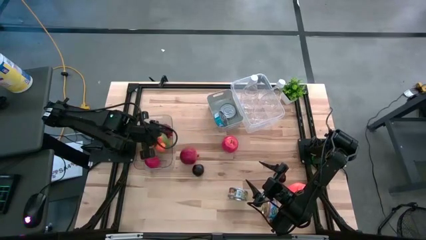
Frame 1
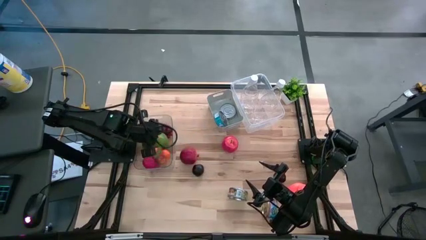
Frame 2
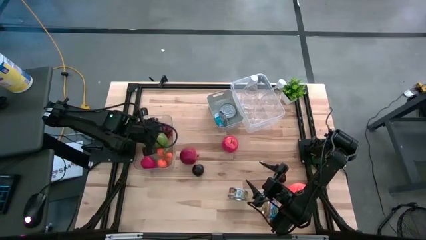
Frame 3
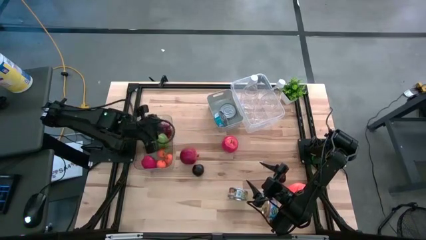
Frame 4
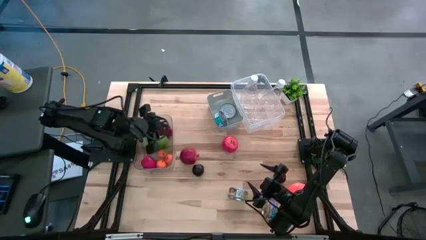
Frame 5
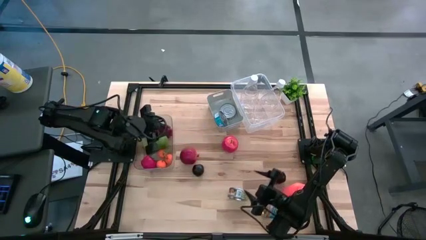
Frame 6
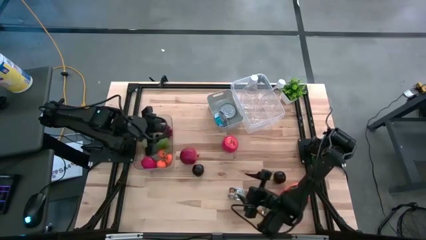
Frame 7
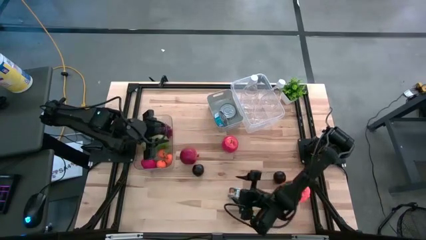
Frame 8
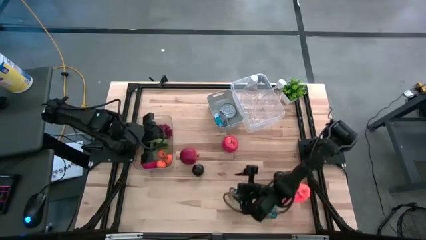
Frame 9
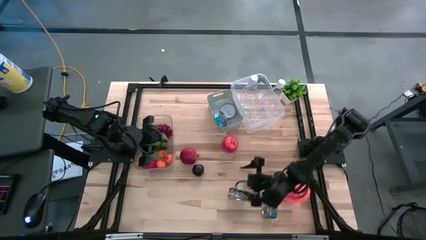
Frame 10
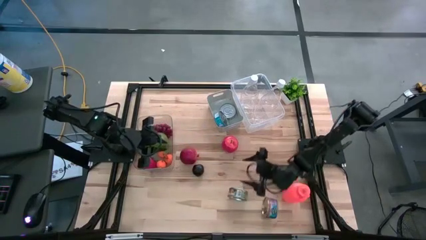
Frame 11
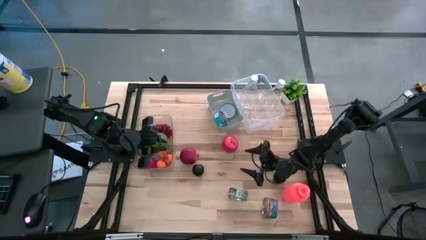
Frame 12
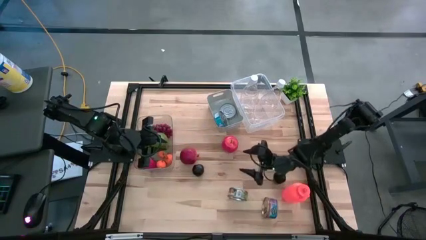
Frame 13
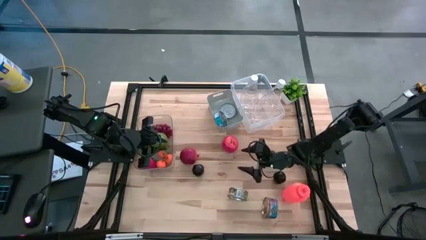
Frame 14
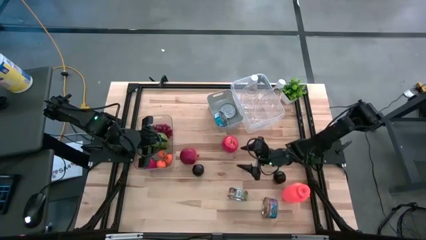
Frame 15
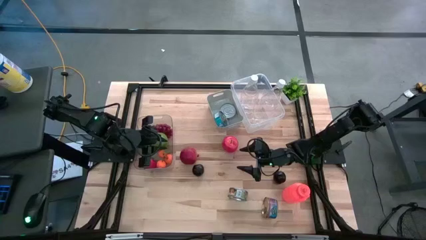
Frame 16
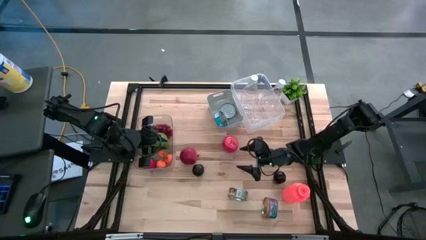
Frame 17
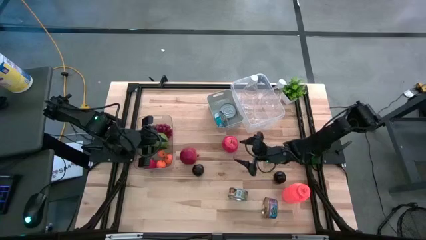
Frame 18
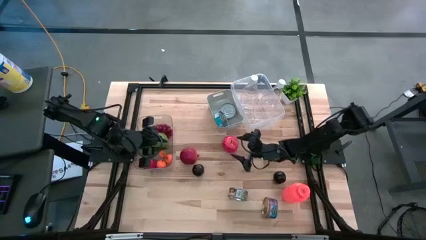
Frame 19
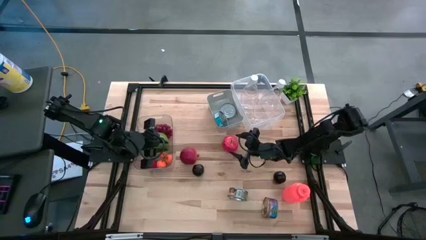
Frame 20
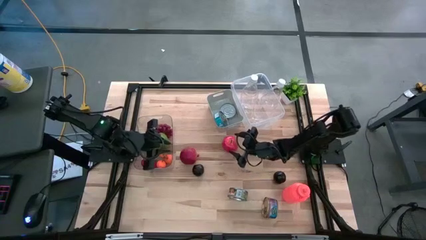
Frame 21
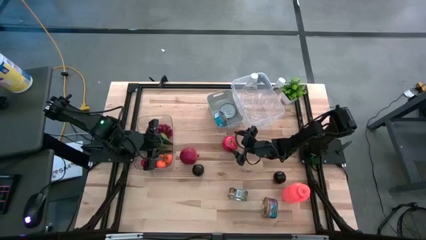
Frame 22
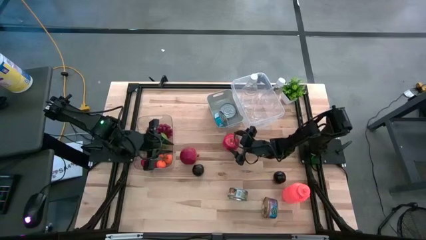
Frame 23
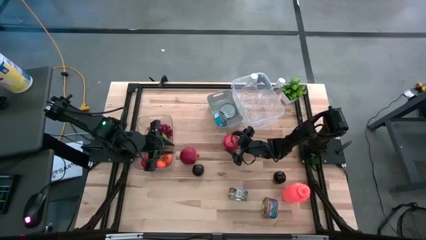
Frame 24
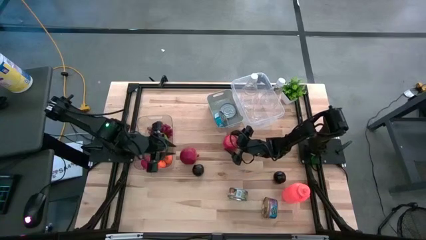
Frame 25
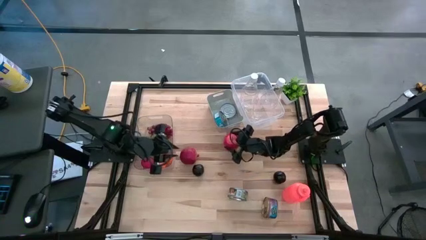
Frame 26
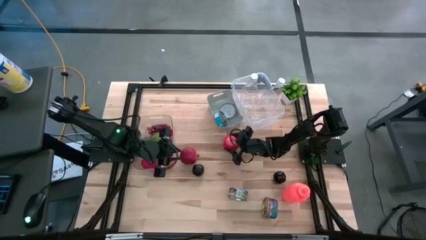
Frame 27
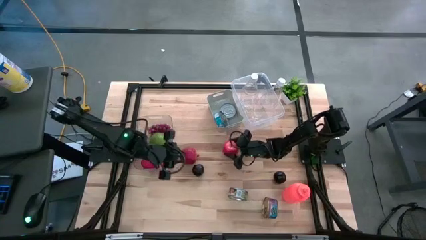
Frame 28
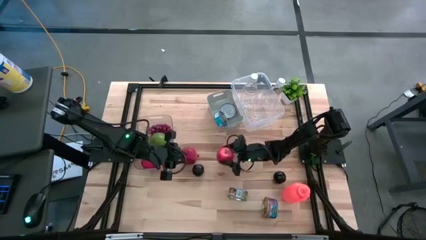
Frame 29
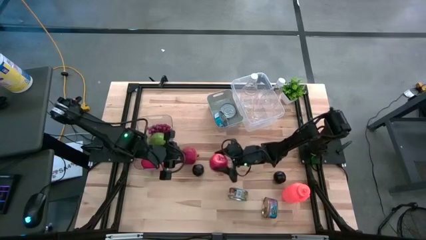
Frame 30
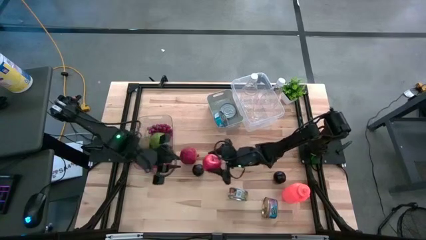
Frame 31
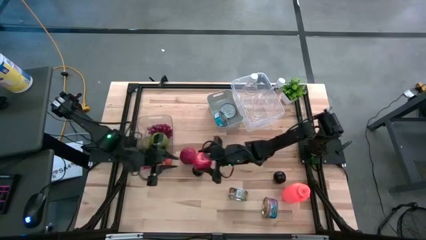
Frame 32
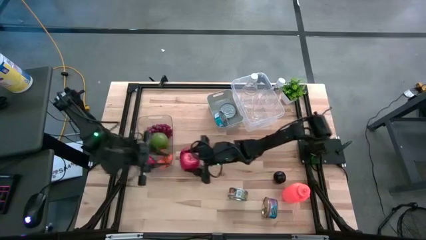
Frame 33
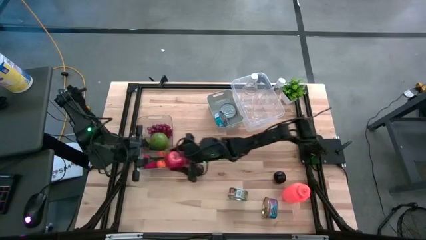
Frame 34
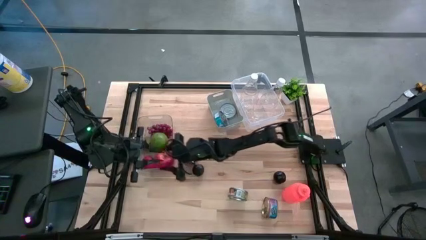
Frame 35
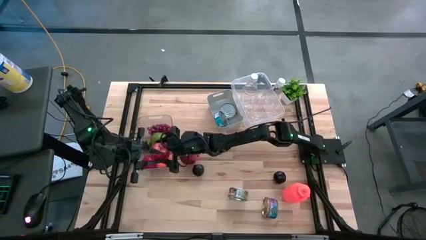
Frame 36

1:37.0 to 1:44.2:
Task: Pick & Place Food Item
Put the red apple into the left transparent bin

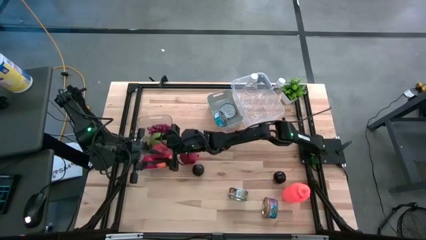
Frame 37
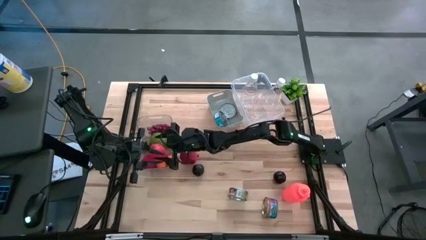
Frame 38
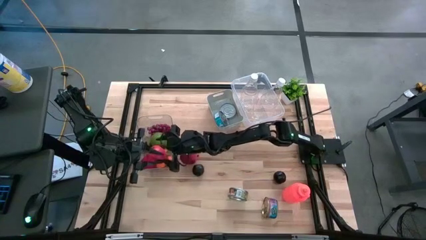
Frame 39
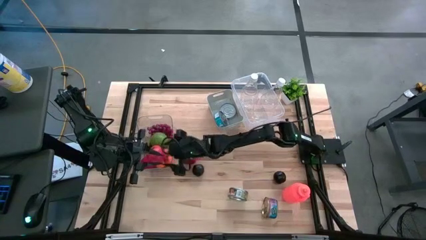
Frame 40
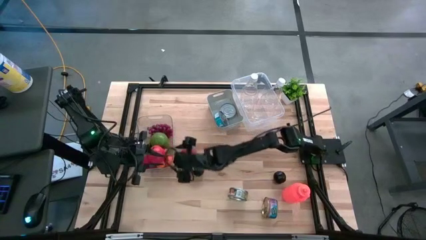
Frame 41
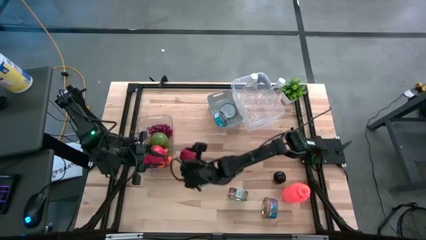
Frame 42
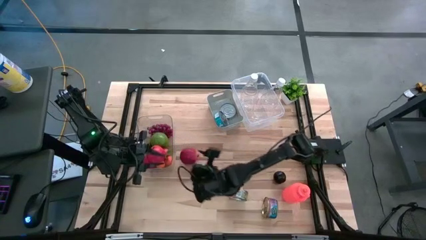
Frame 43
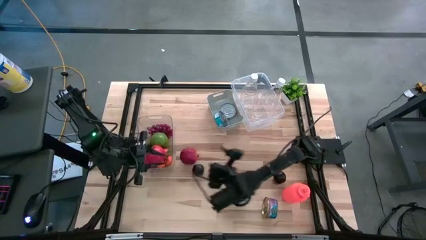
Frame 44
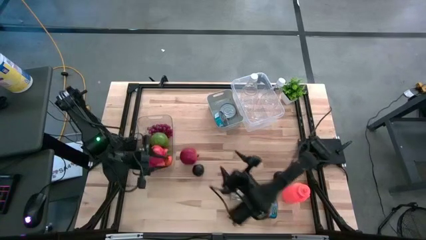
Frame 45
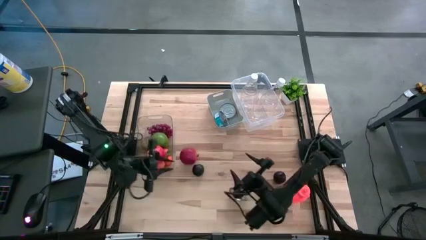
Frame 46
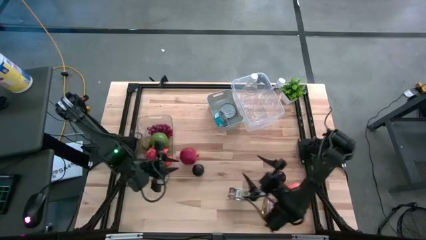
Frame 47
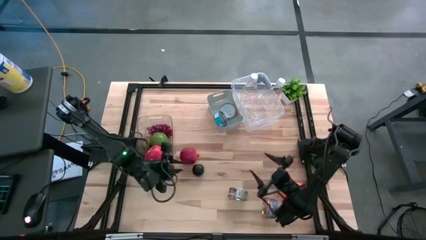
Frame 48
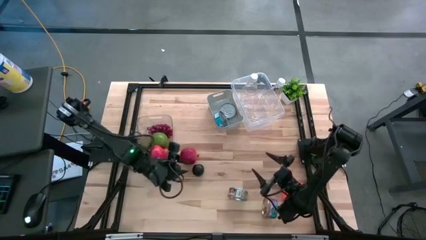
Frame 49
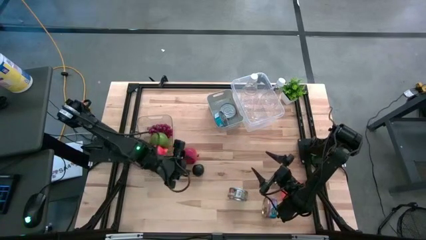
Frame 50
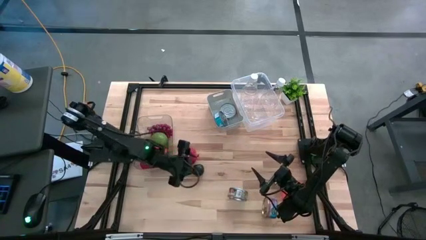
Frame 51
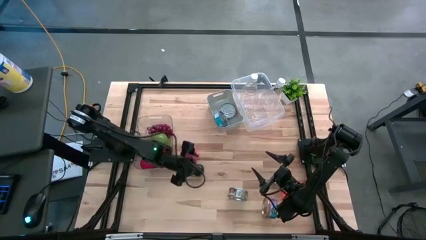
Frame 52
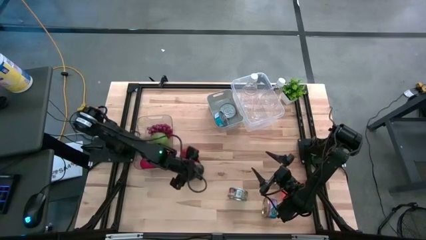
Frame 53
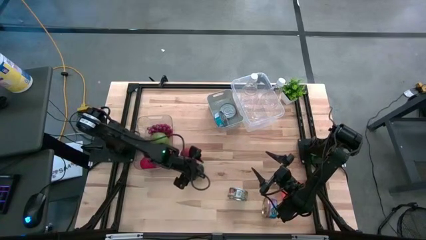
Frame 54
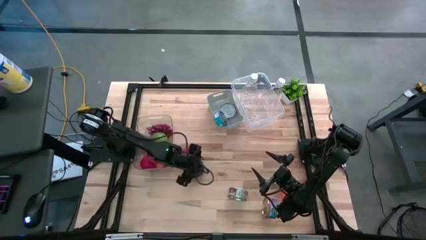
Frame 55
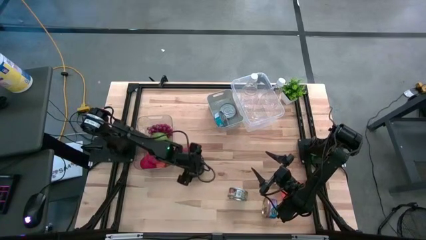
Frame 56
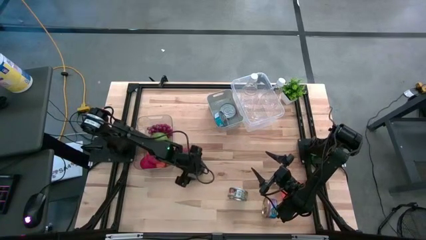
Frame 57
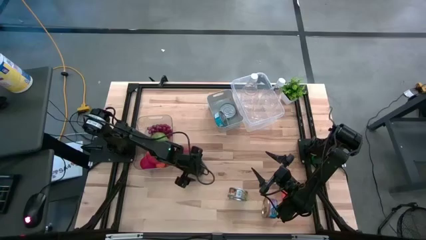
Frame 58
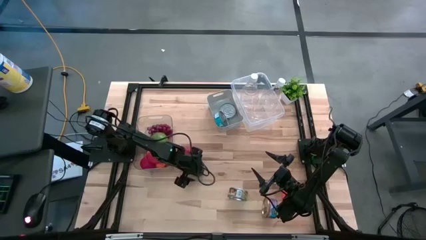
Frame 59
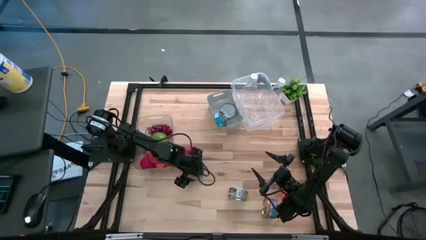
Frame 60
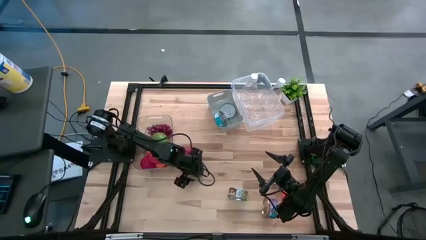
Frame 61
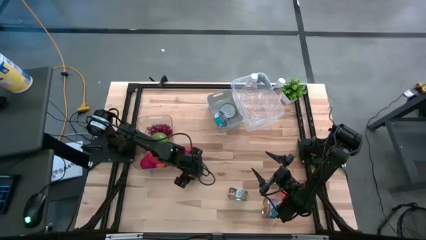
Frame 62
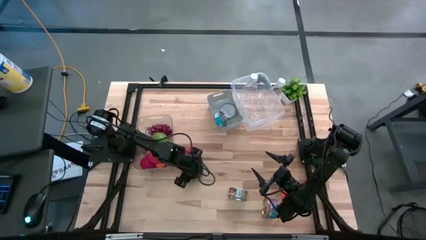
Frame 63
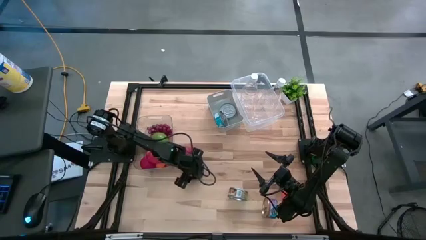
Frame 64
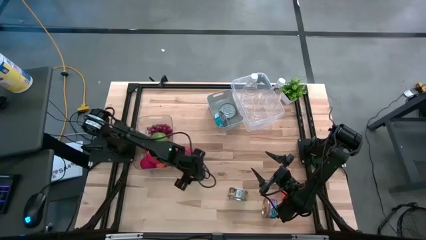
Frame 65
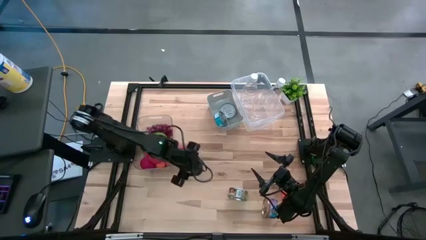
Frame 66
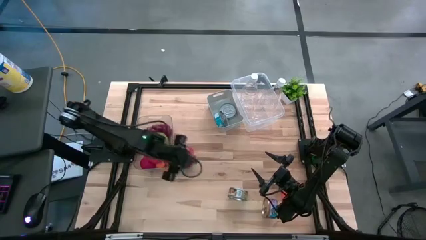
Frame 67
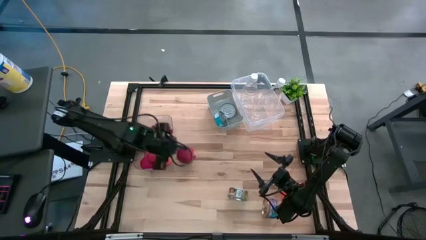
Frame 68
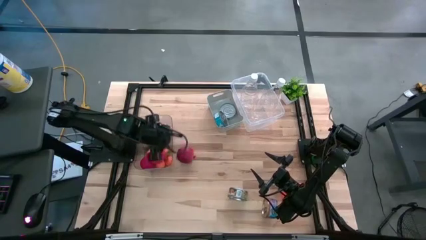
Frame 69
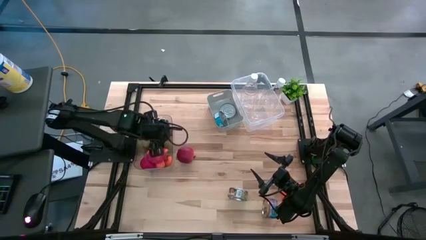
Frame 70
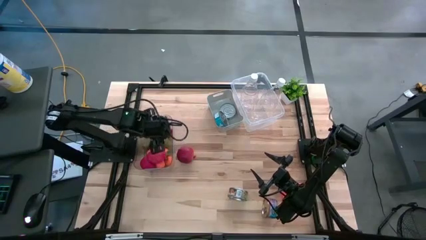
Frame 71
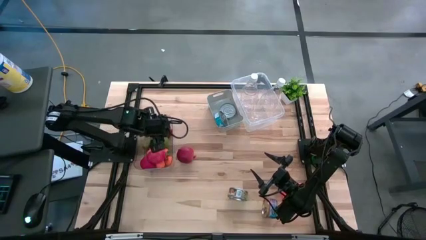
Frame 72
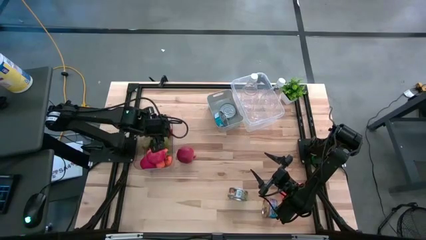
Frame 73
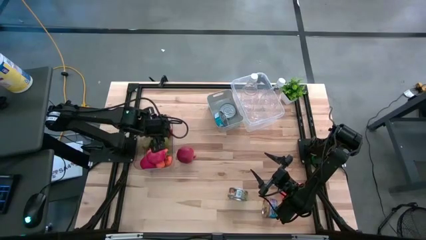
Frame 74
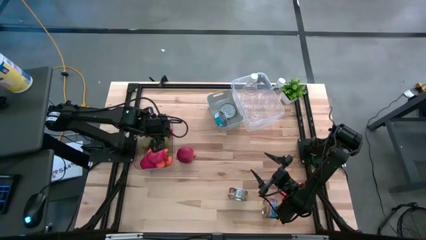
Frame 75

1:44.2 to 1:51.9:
Put the left black plum into the left transparent bin

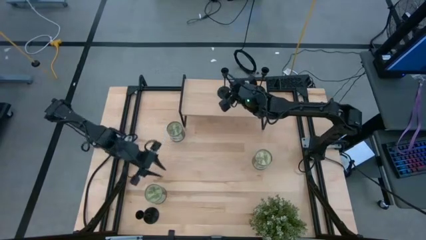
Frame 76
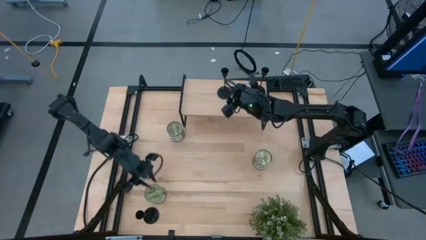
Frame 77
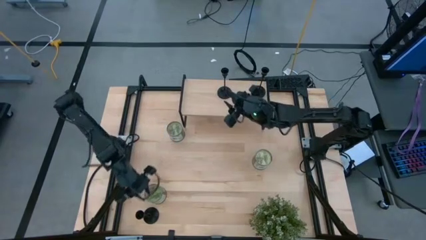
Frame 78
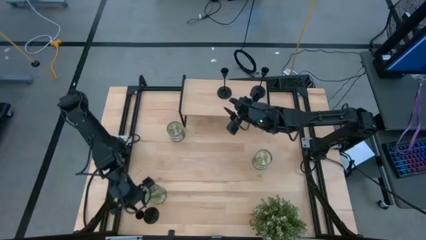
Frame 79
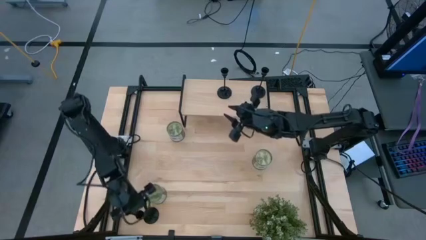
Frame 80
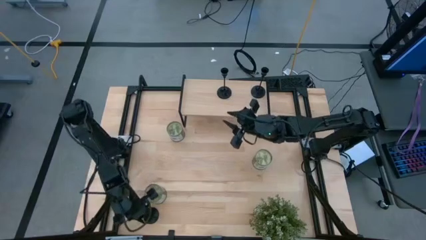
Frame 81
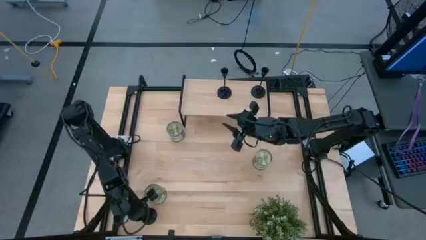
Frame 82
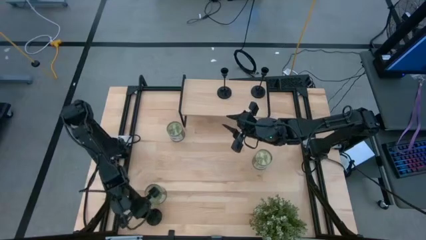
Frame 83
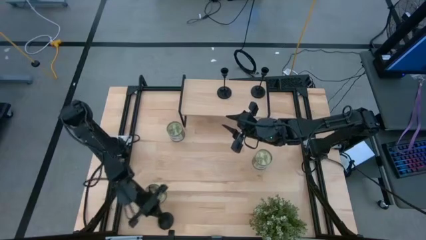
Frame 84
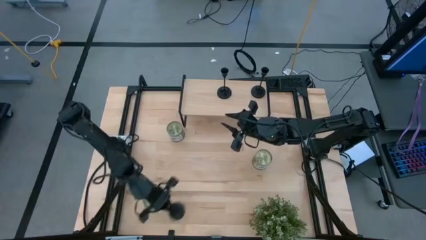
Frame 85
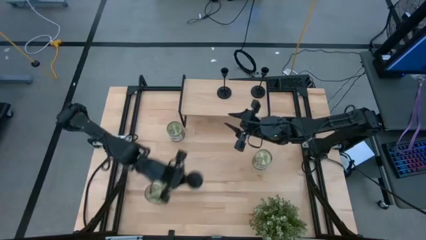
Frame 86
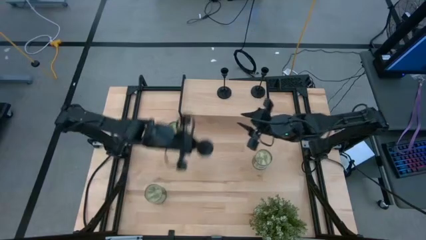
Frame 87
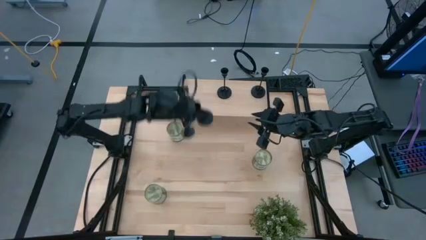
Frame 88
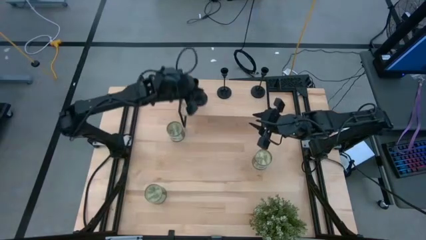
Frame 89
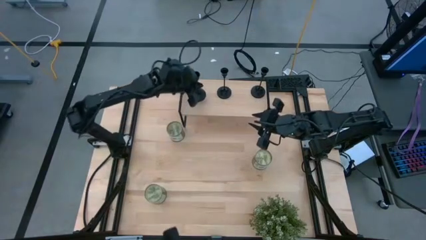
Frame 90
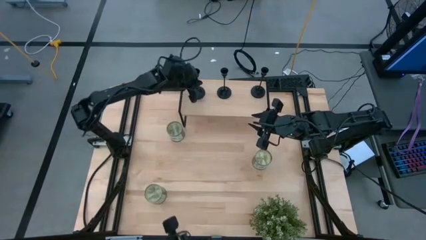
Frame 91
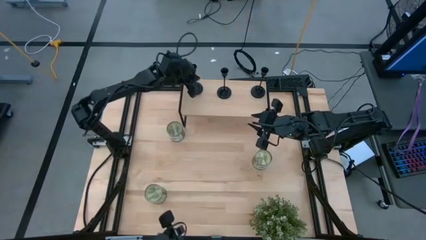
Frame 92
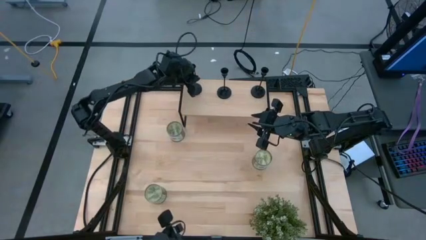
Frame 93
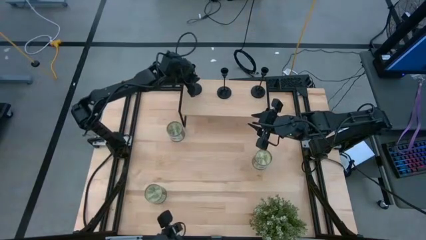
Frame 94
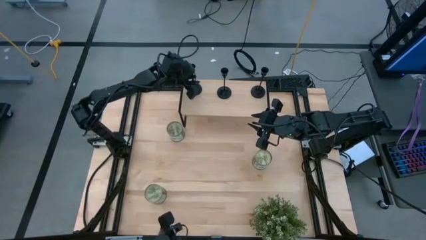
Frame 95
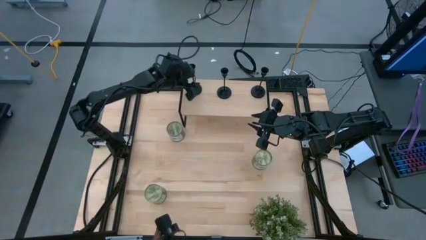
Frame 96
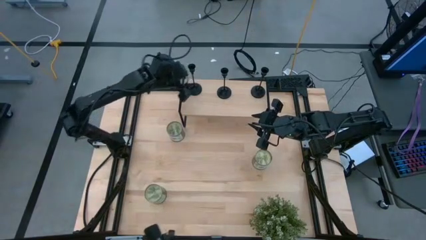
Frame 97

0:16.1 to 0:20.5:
Task: Pick & Place candle stick holders
Put the candle holder on the shelf
